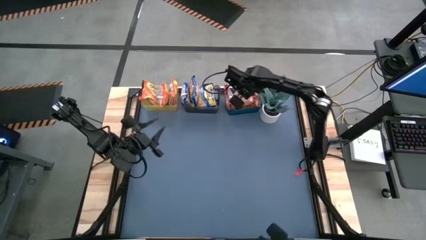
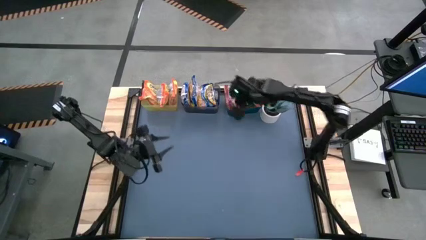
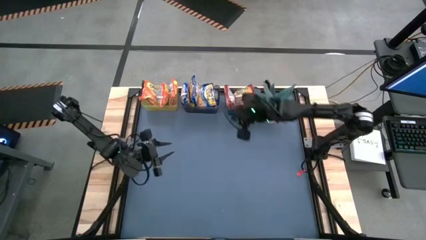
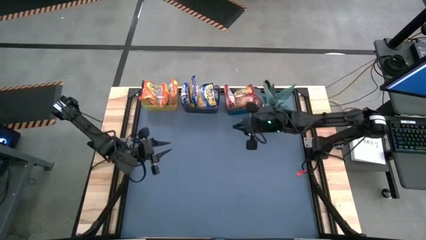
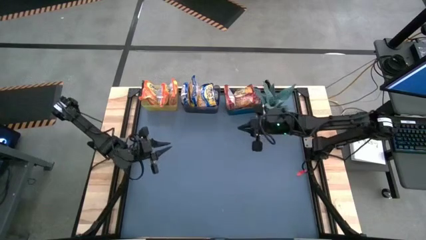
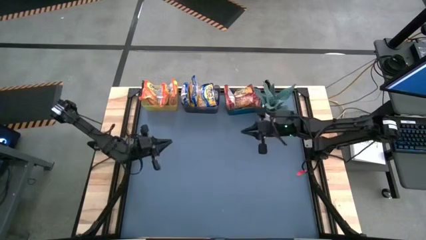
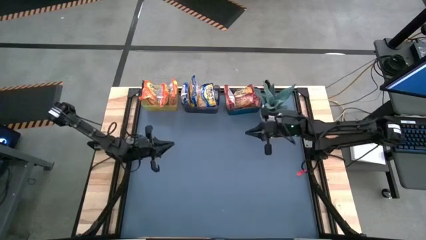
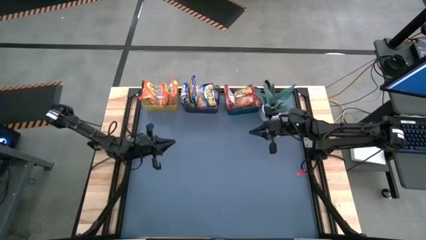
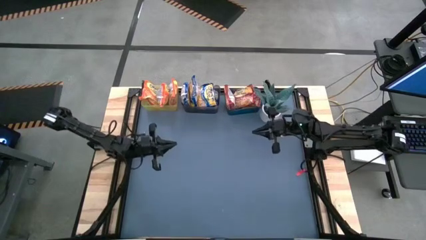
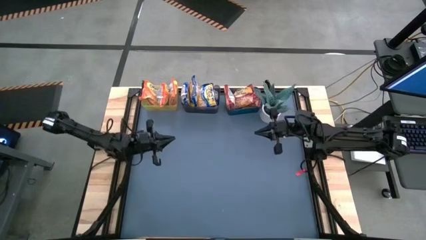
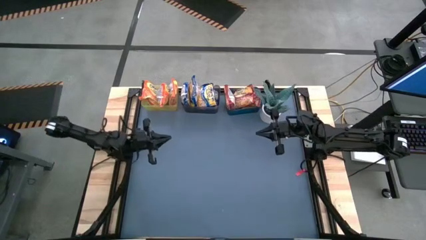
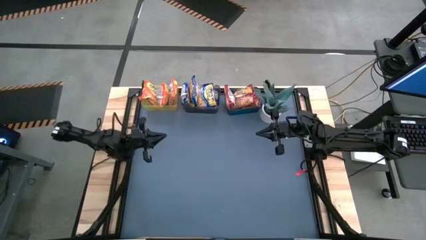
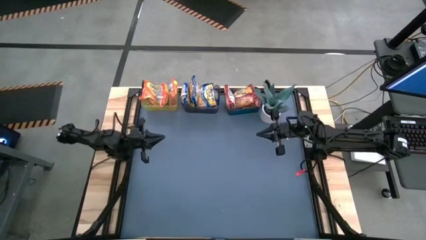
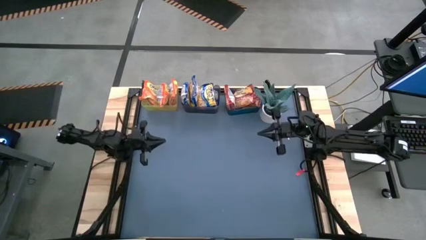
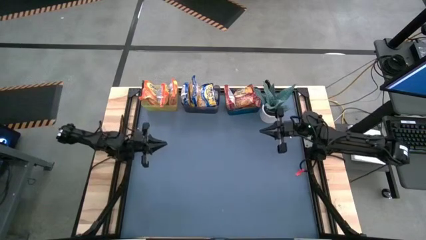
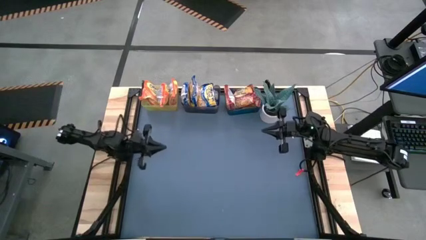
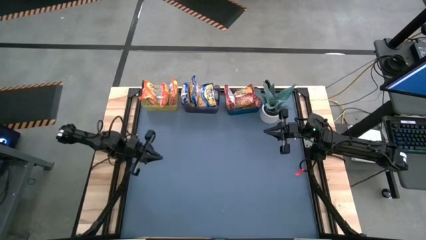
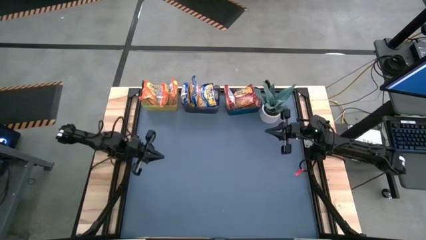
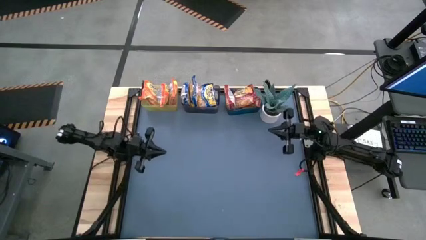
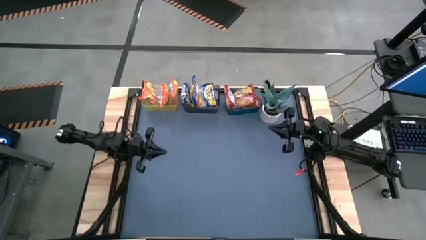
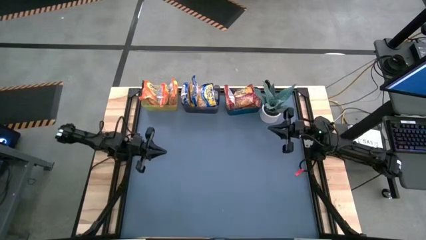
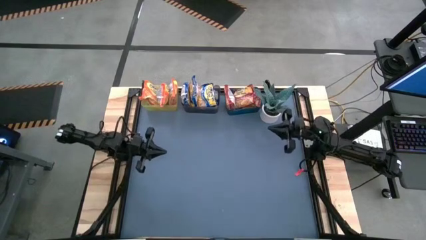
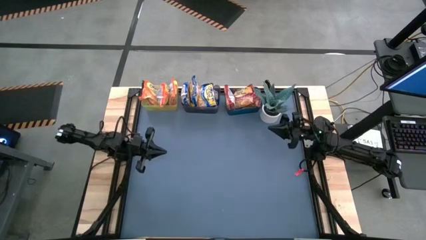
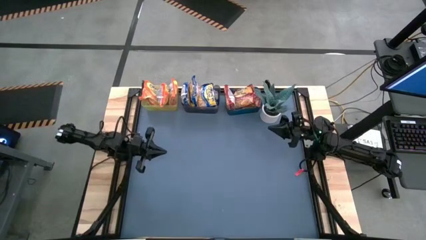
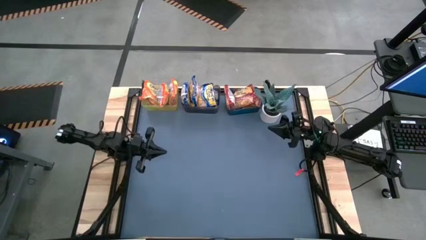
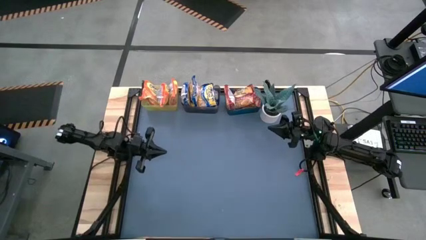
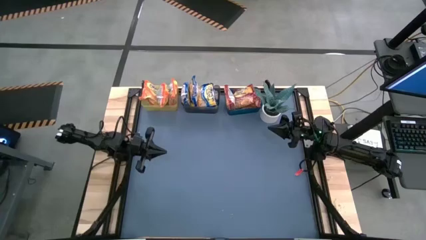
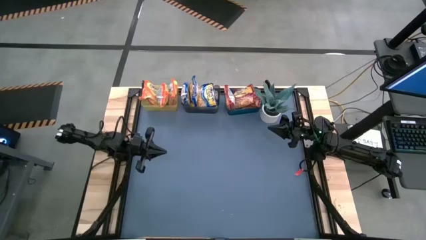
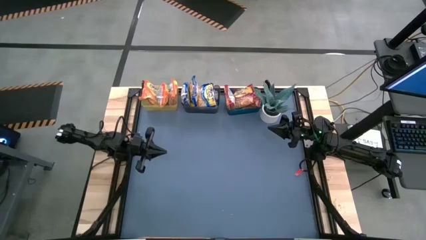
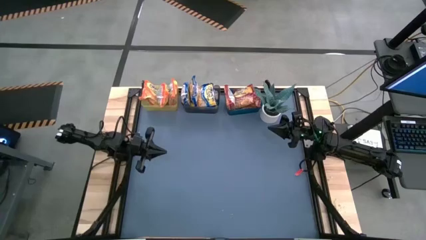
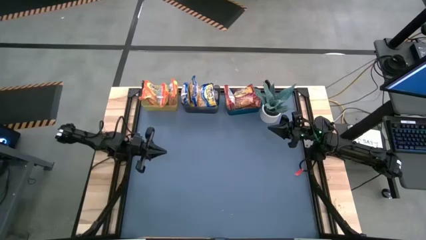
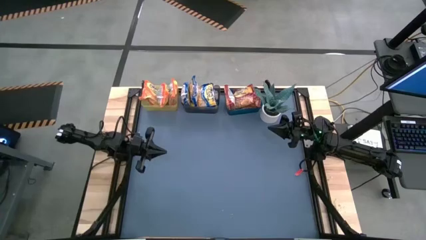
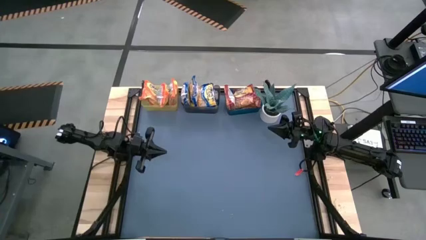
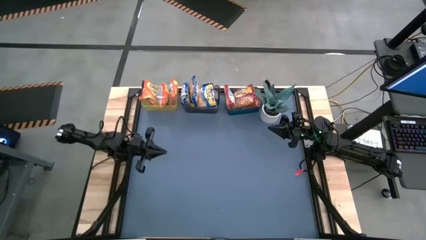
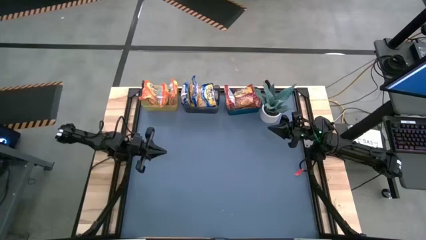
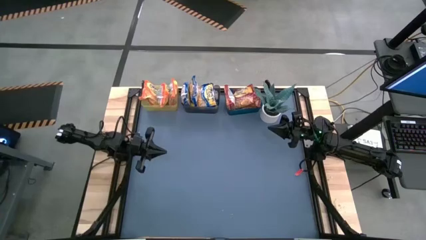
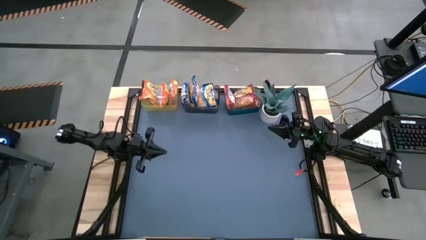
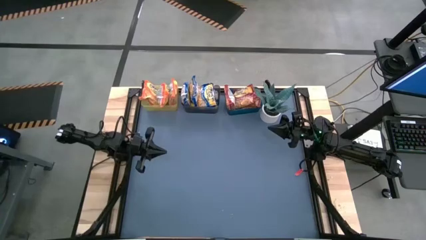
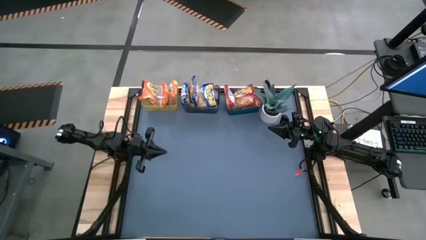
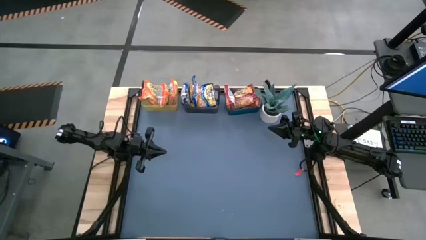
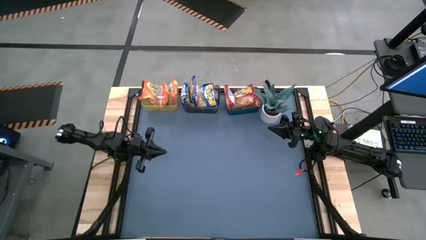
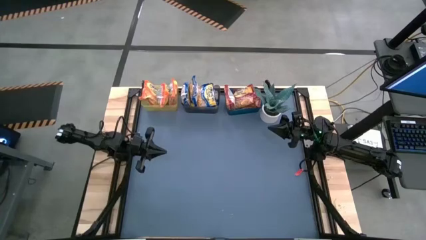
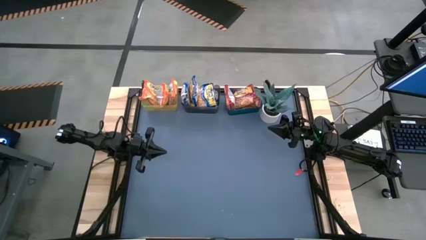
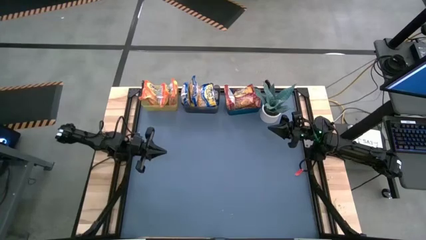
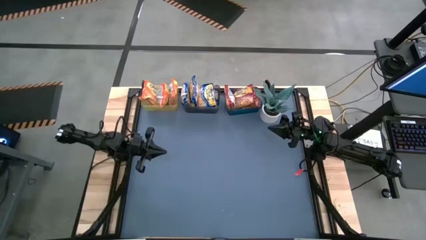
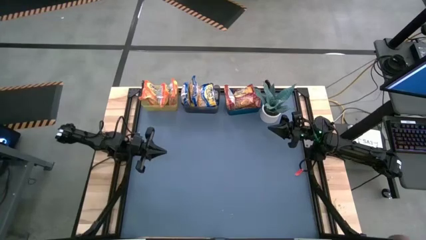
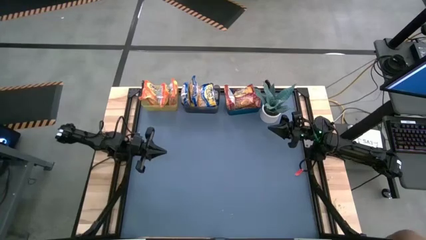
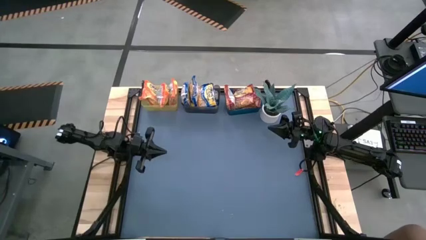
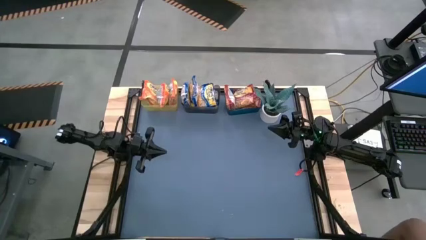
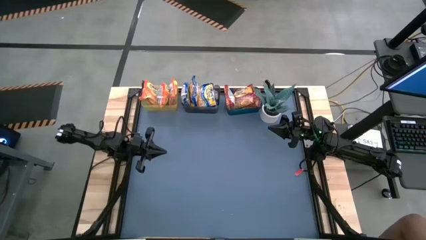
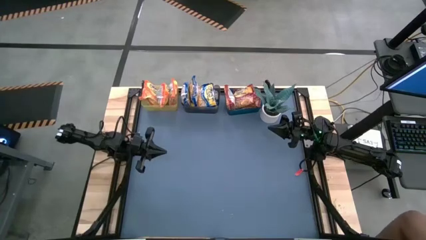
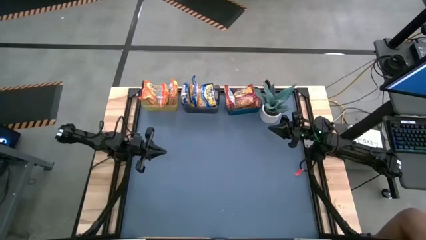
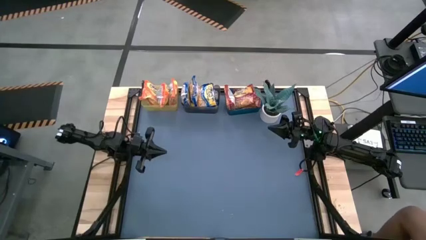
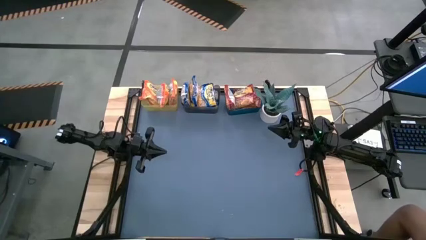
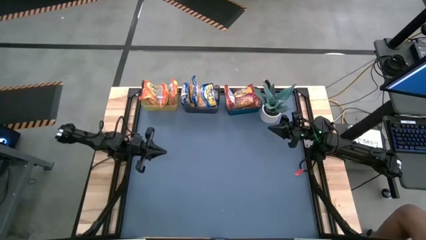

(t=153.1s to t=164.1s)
Task: Sort Maruchan noodles
Return to Home Position
